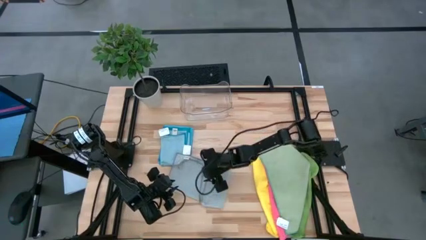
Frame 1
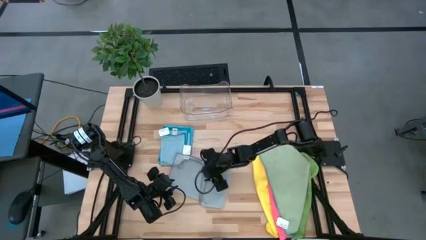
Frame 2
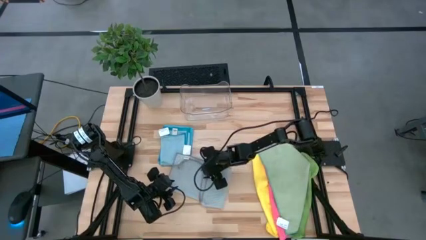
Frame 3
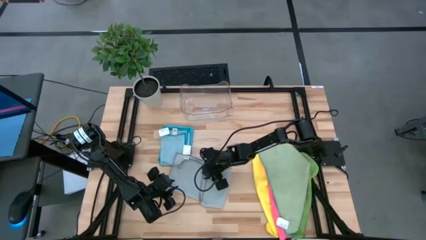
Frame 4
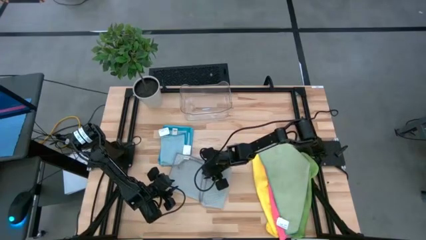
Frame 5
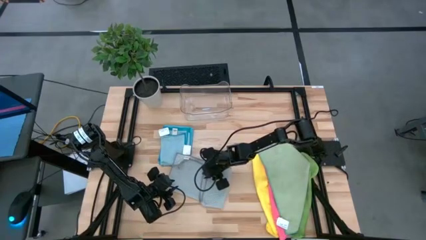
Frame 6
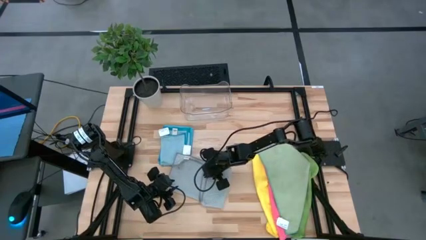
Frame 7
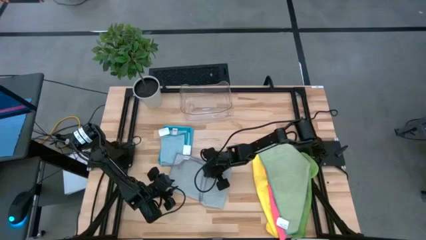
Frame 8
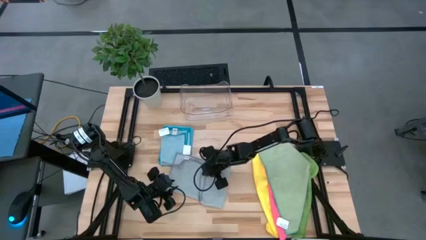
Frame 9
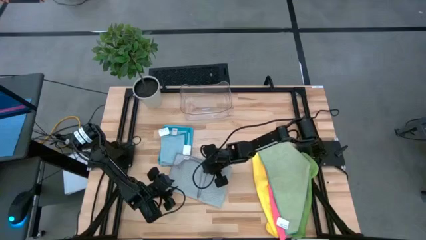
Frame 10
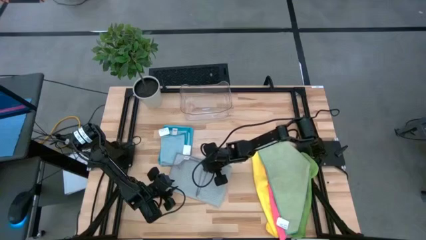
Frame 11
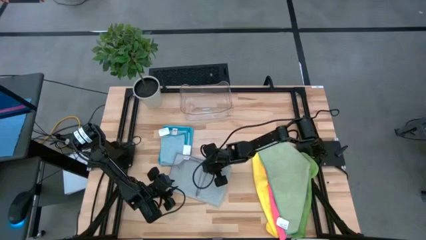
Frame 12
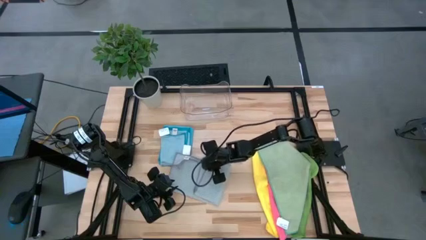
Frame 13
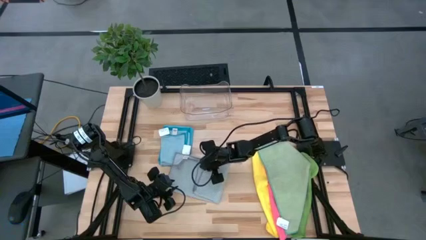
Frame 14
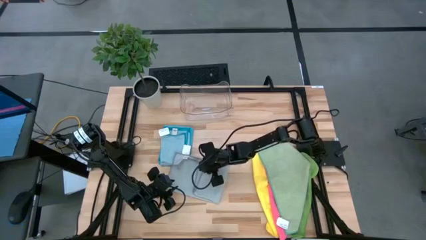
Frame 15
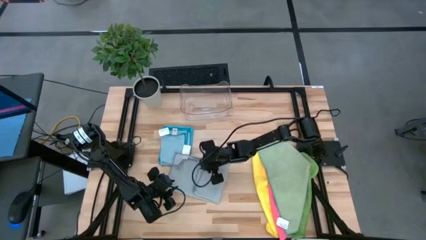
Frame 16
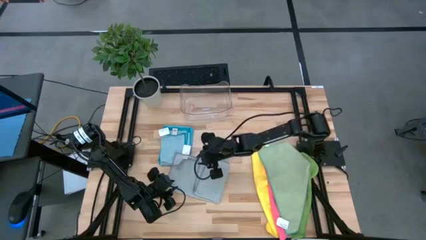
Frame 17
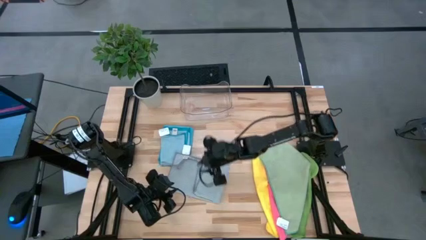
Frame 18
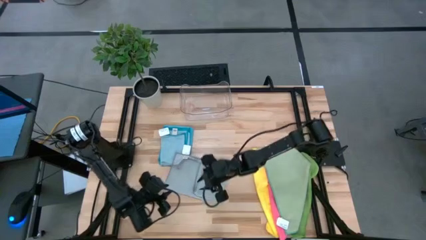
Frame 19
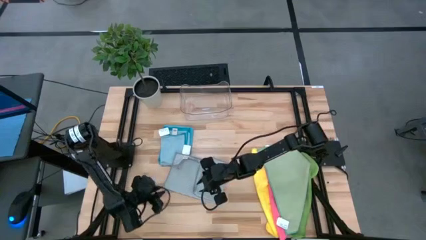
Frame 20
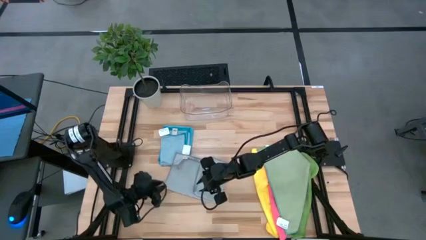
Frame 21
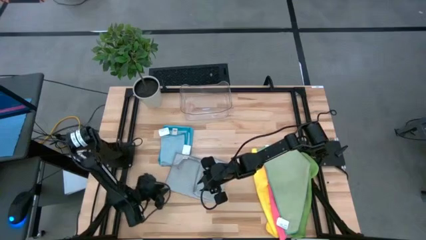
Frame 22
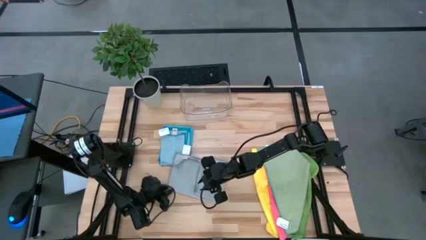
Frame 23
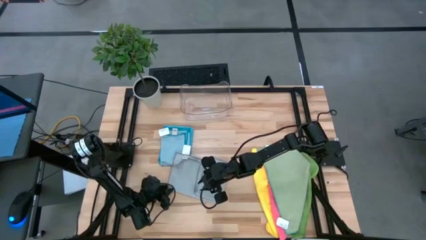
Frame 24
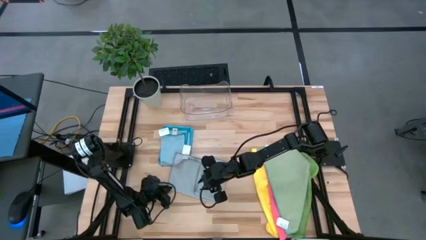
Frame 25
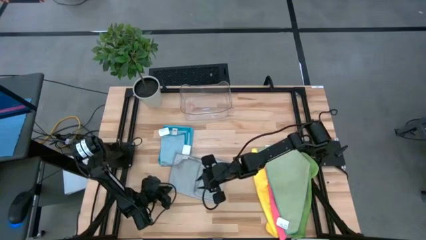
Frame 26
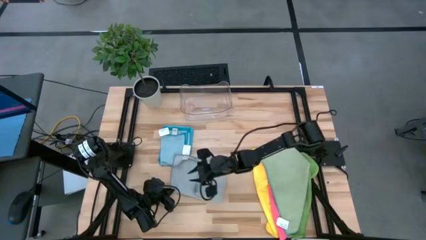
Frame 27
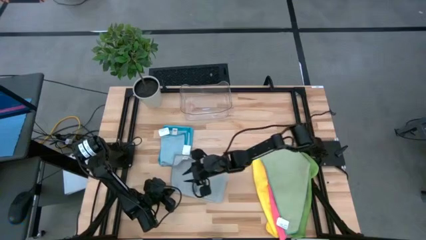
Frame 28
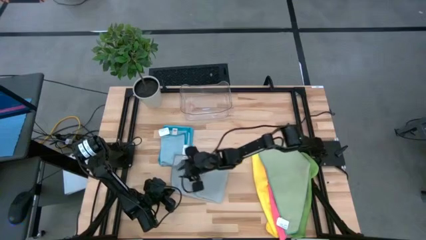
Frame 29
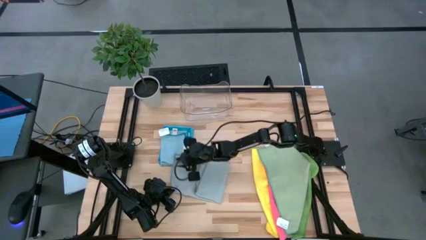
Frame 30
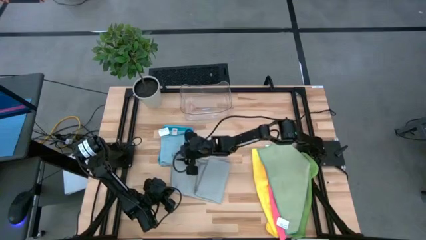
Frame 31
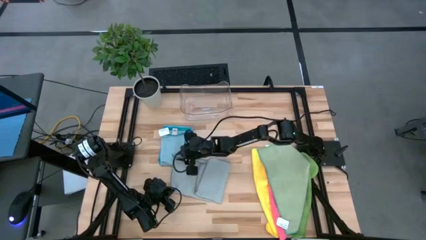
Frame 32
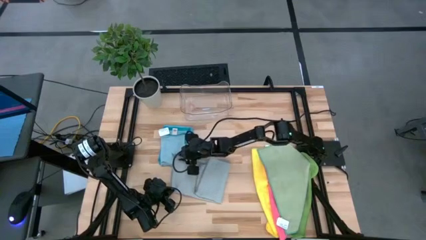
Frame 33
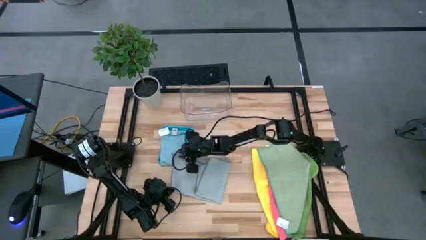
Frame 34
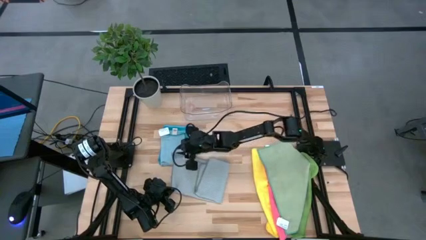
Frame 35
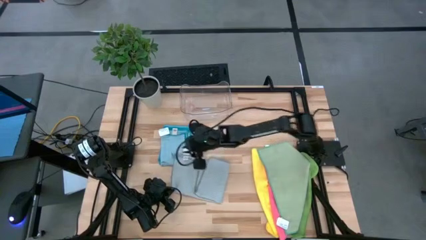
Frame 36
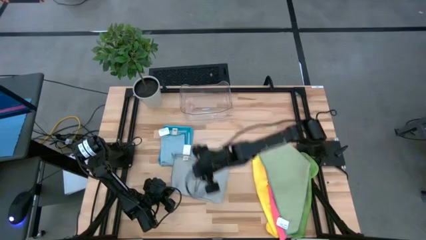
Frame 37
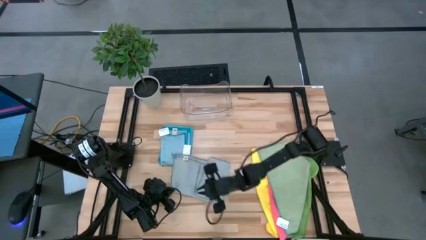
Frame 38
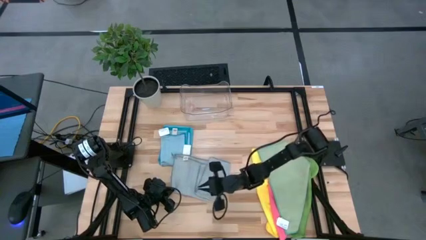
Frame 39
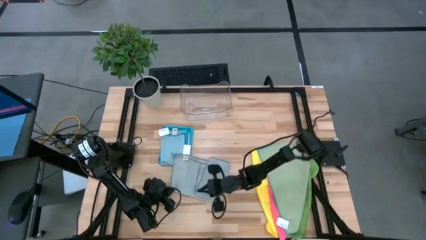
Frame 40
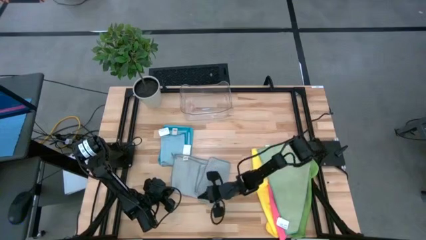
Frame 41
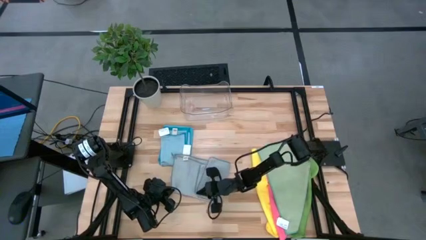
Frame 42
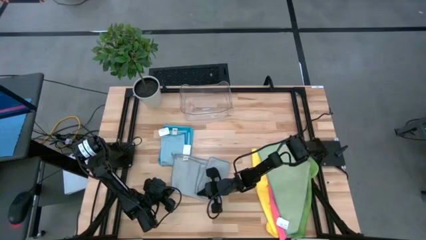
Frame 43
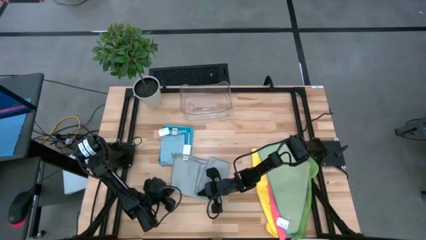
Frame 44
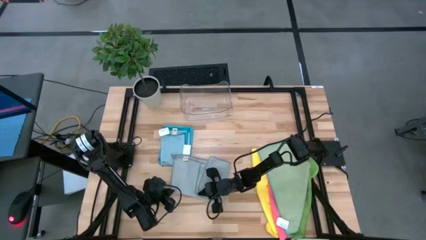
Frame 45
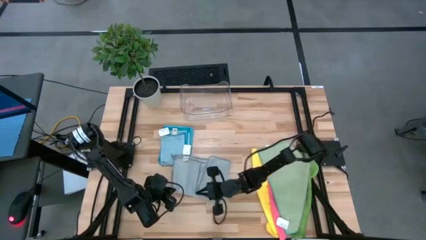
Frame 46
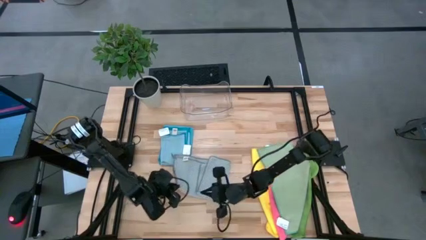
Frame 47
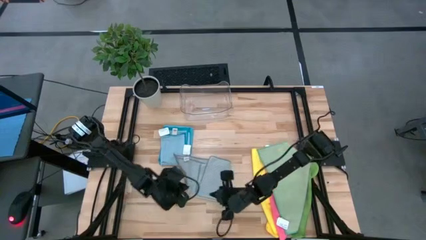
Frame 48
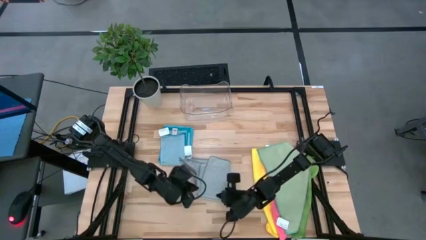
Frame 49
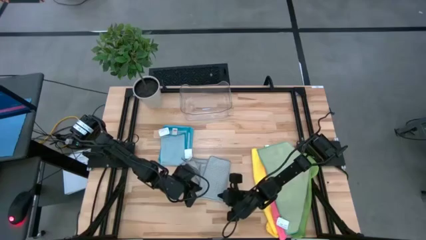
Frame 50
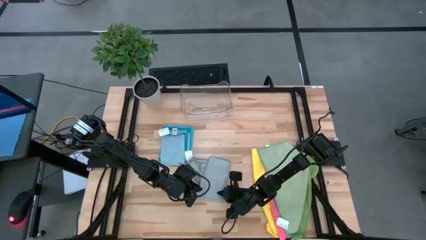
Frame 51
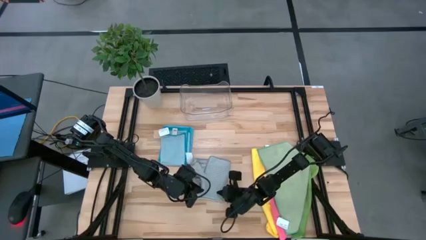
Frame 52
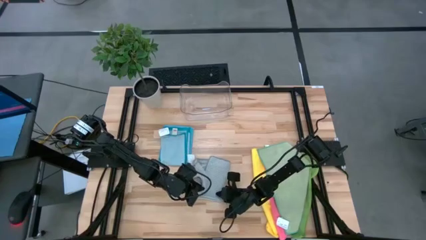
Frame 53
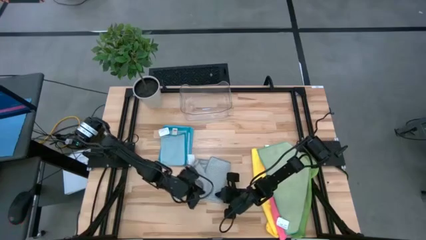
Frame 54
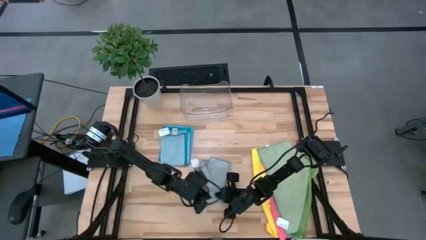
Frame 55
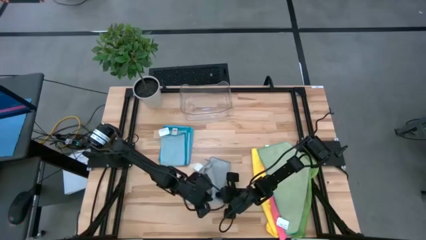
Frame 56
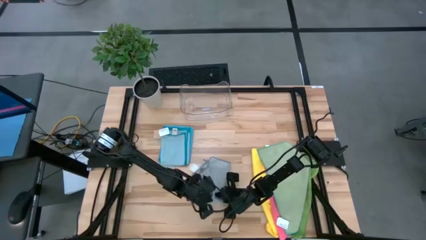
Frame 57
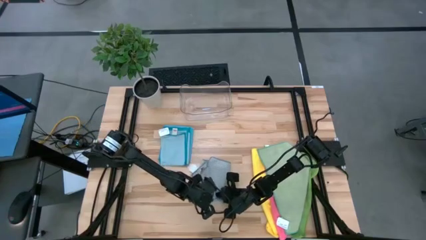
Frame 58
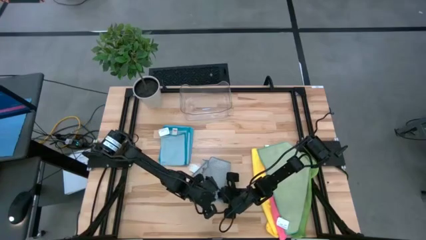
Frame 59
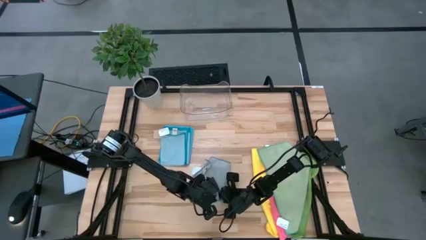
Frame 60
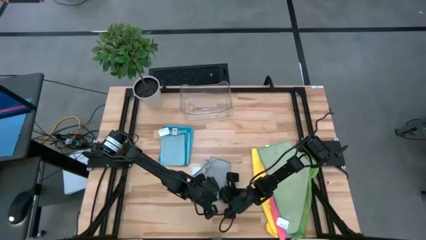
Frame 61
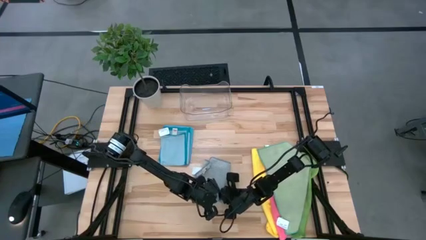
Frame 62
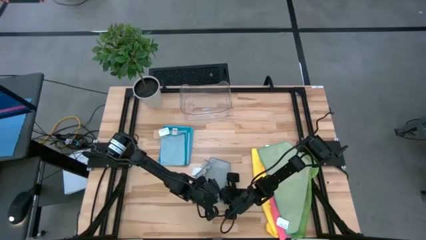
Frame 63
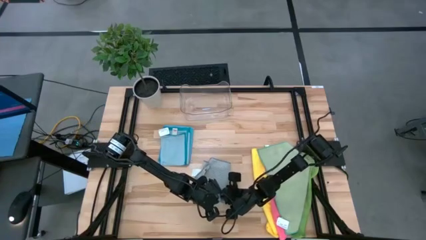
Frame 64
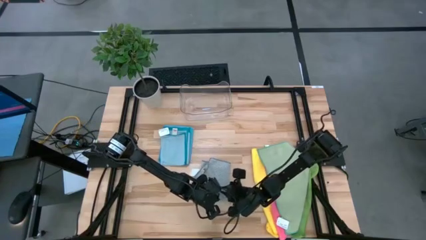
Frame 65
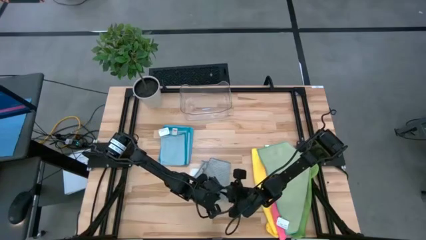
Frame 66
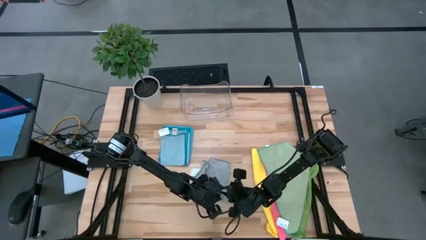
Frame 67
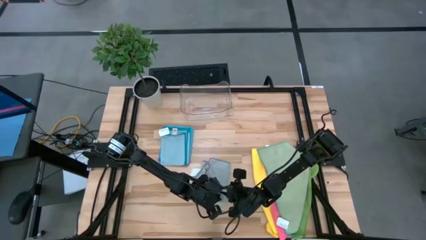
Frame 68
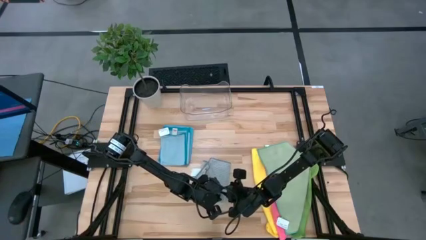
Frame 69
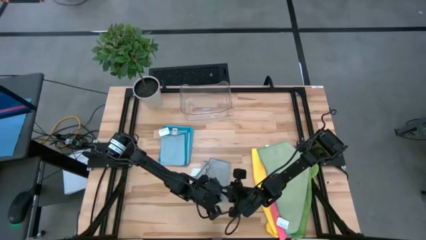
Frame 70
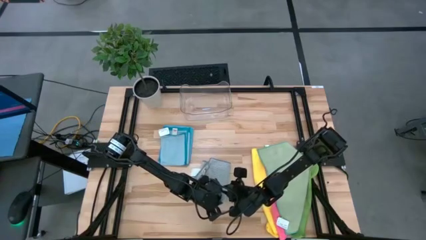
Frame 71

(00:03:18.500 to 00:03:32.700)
Task: Fold microfiber towels
Fold the gray microfiber cloth
